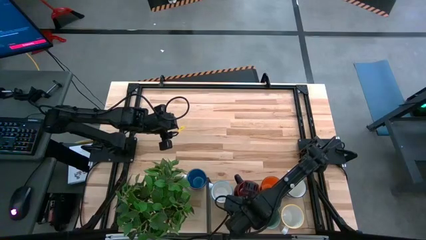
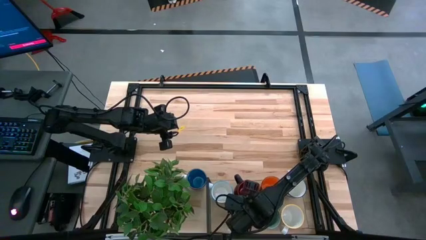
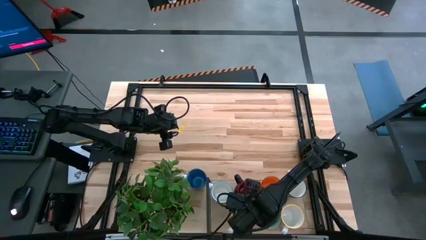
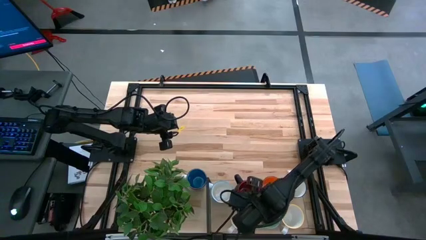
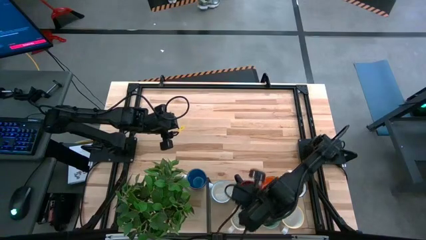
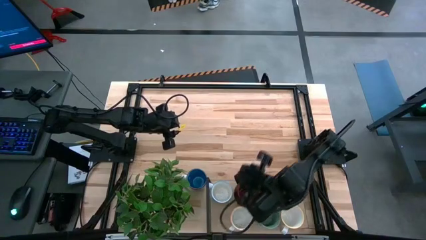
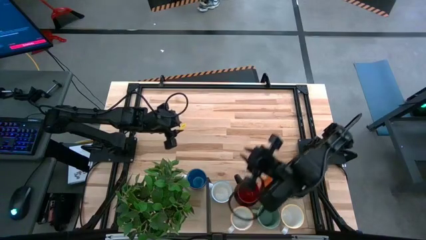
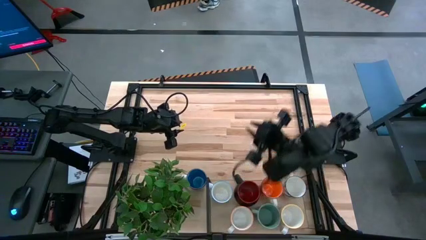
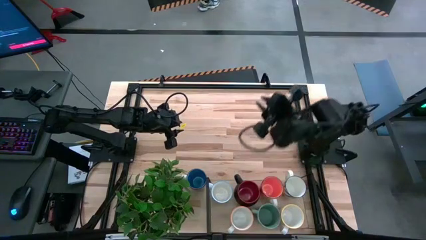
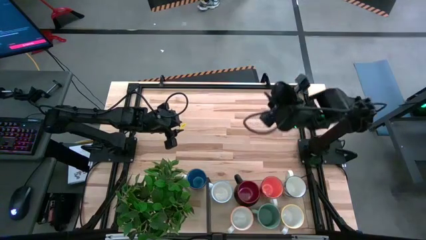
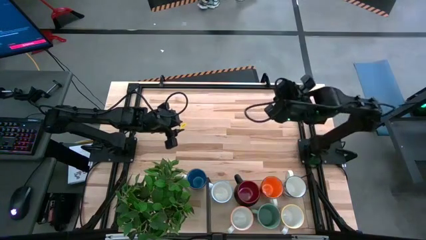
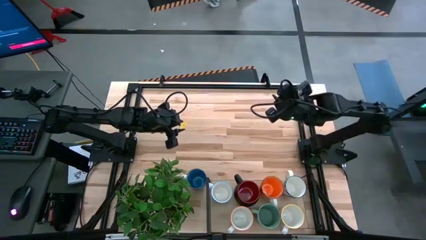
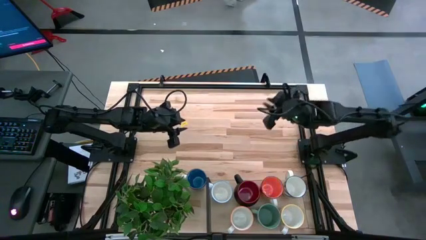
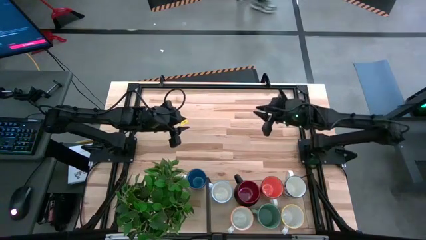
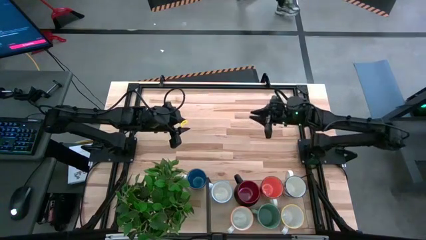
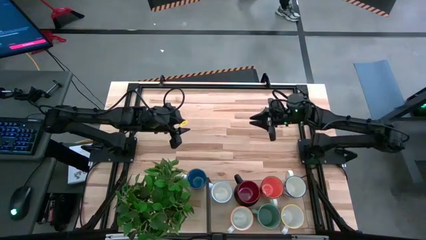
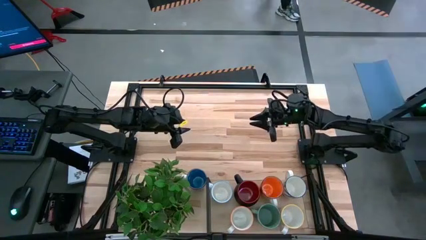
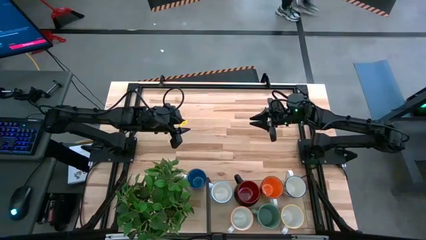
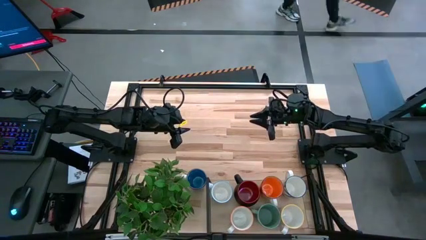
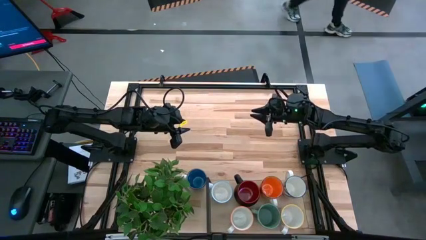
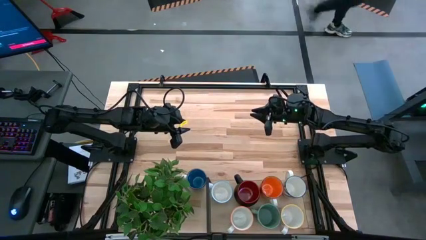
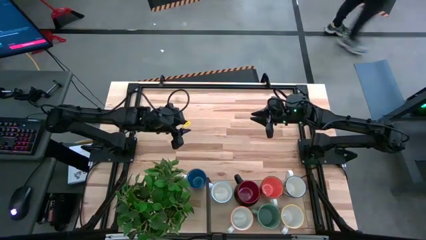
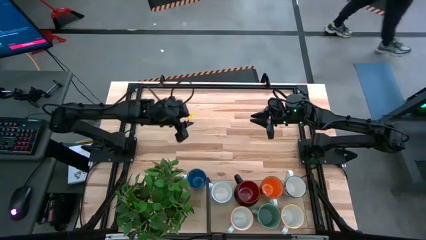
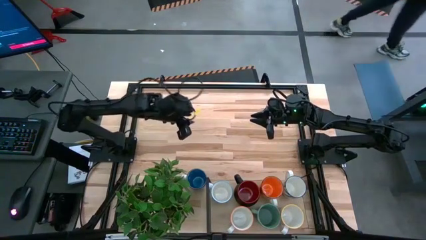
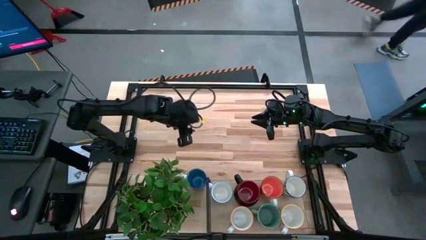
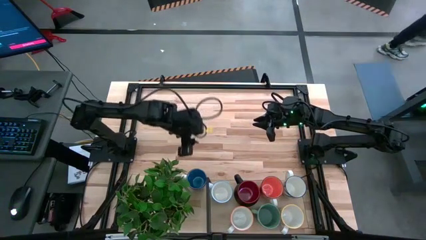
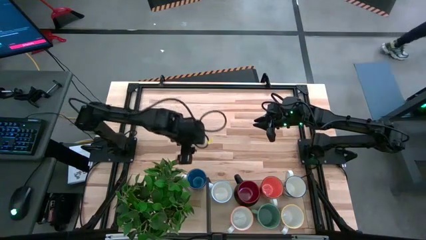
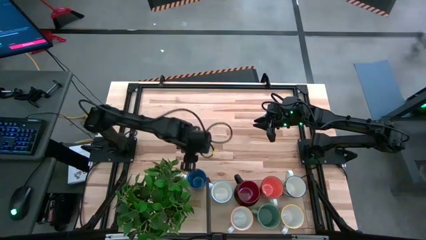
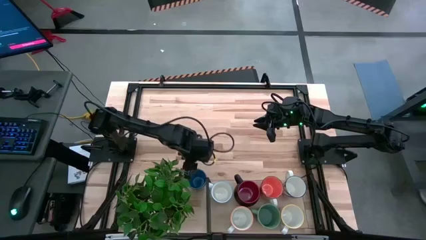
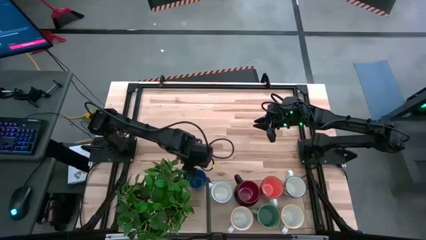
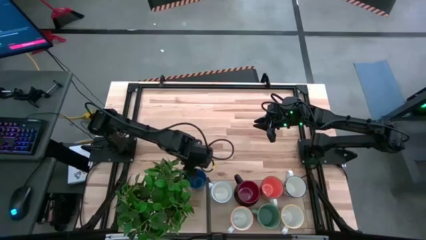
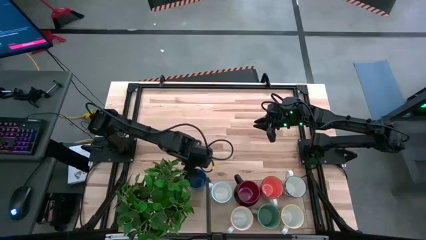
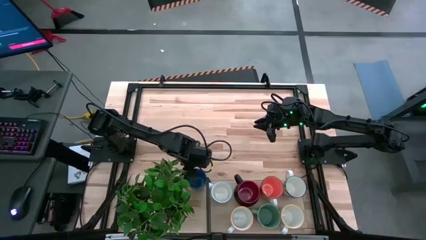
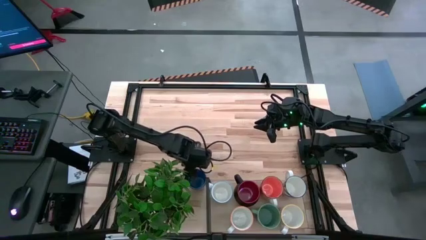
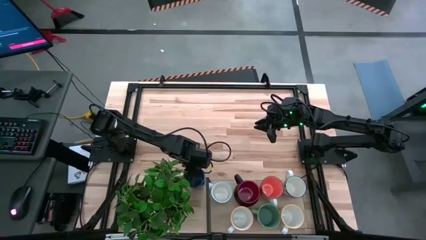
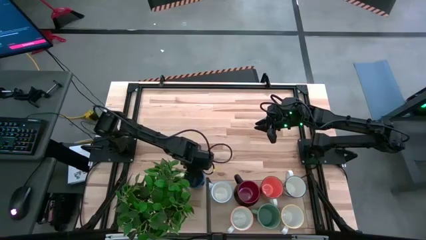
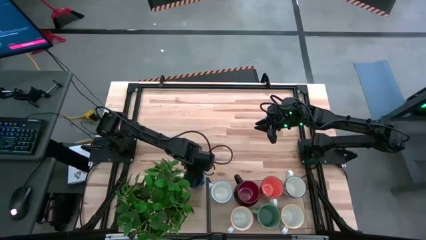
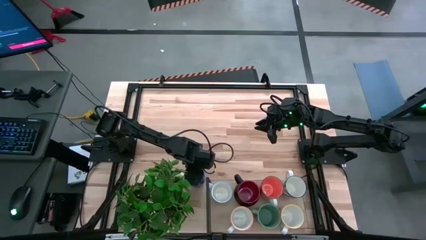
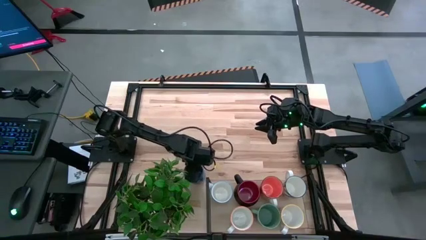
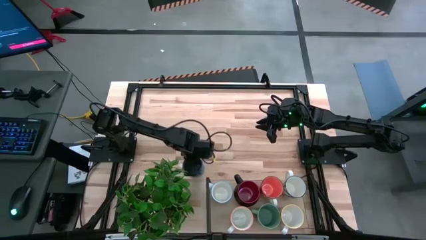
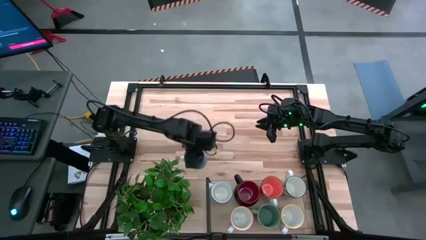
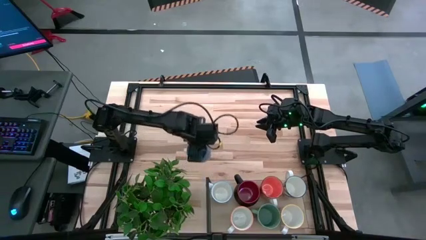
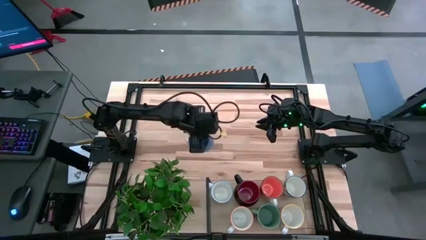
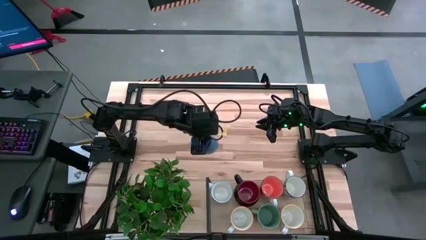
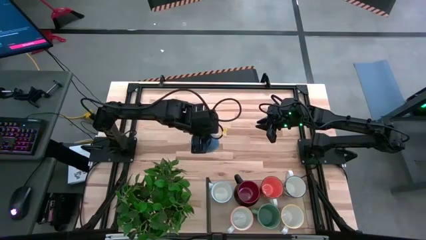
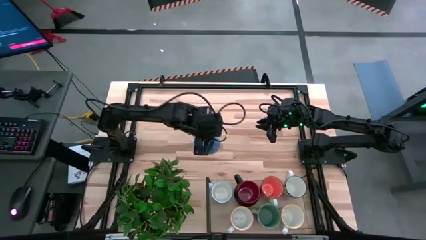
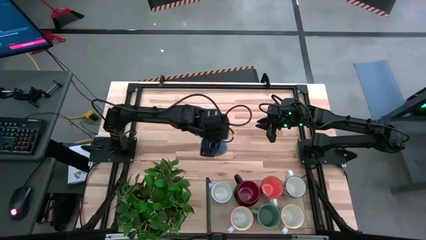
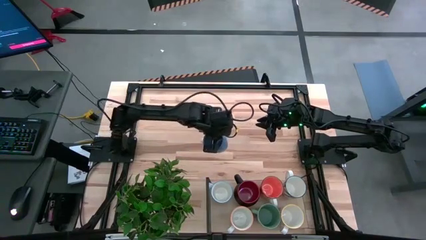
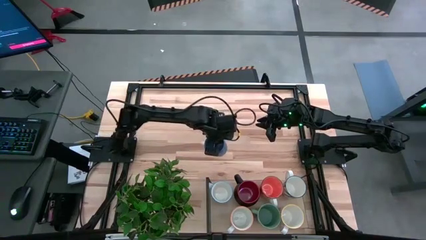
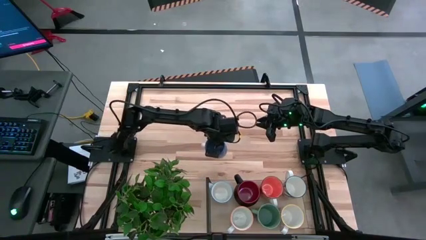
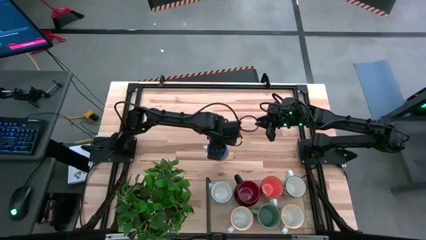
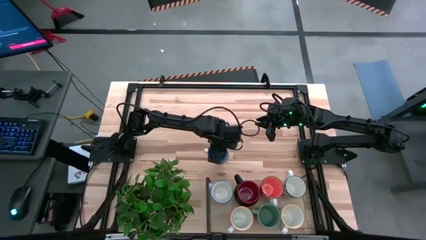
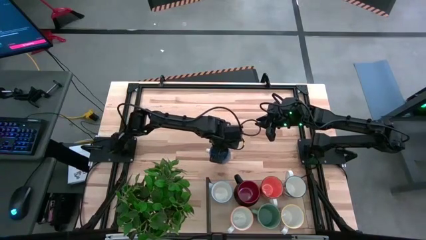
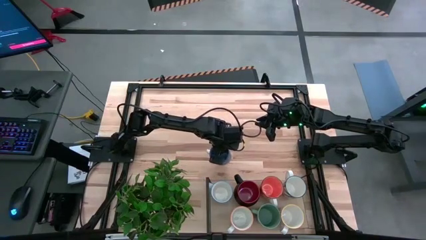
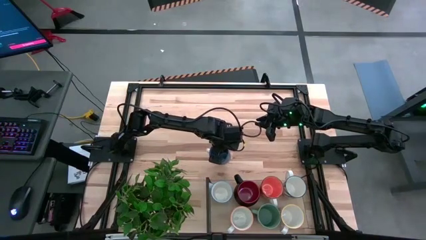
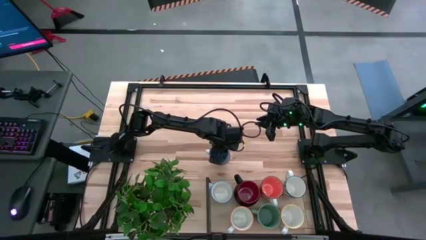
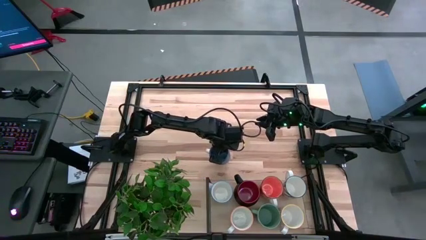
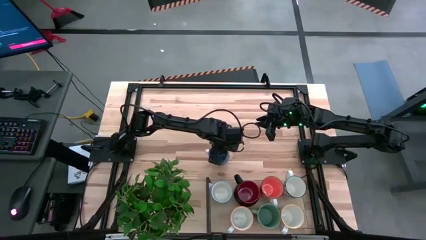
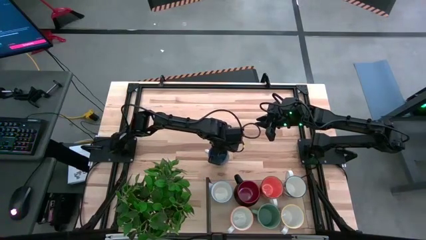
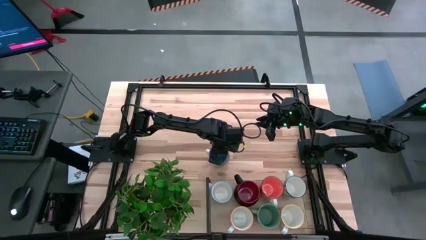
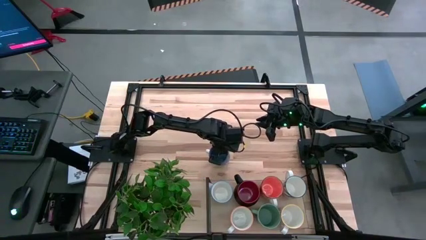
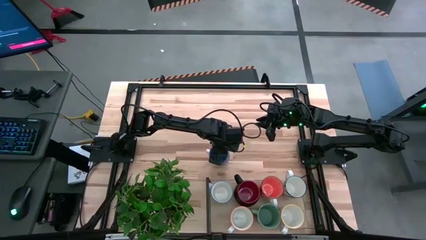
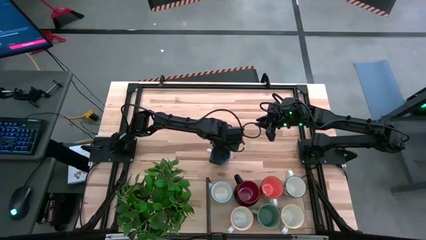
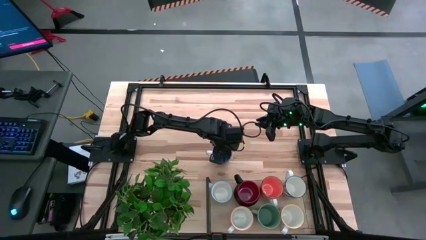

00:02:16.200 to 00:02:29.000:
Task: Place coffee mugs
Move the blue mug to the center of the table

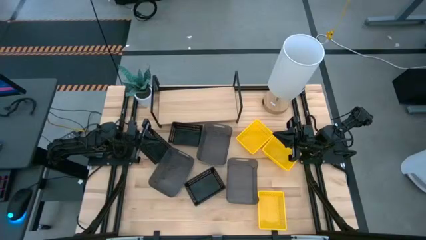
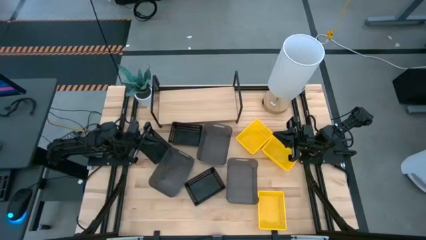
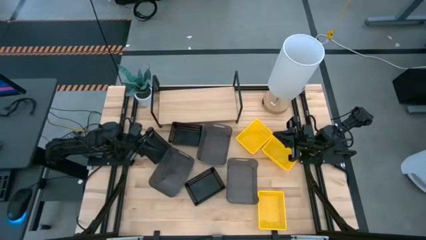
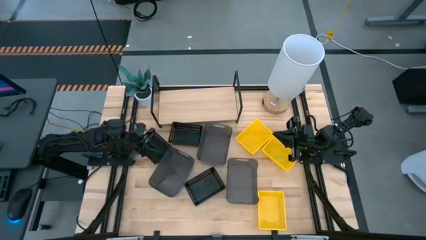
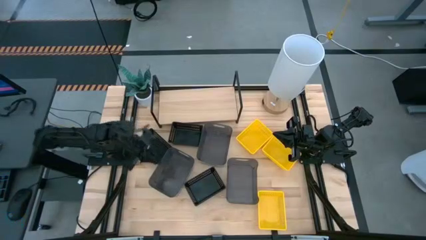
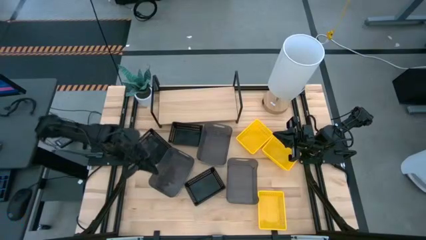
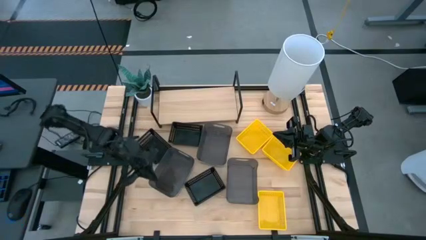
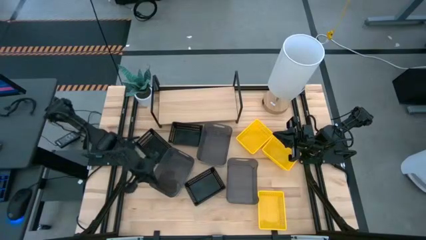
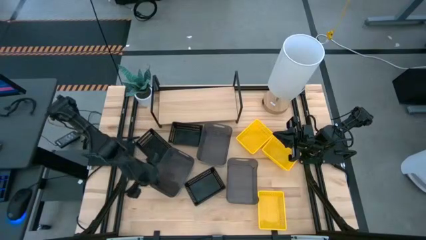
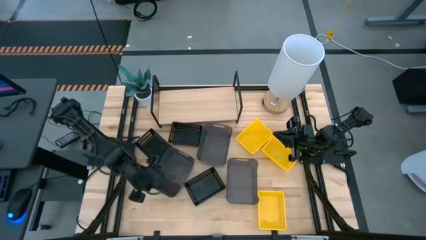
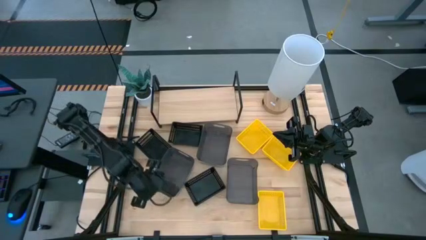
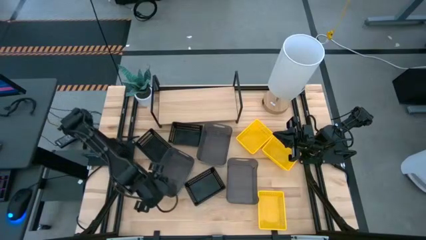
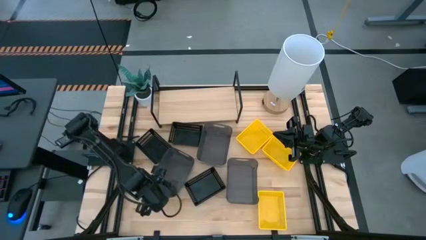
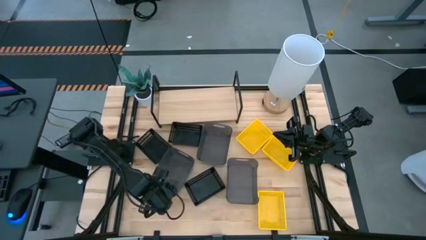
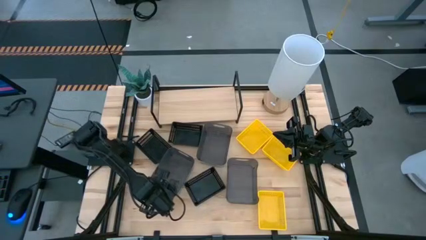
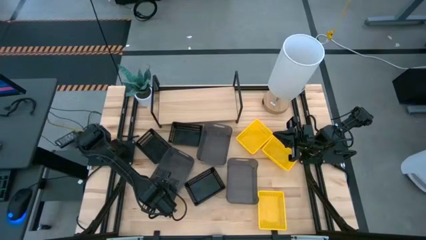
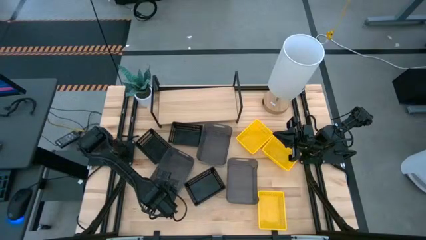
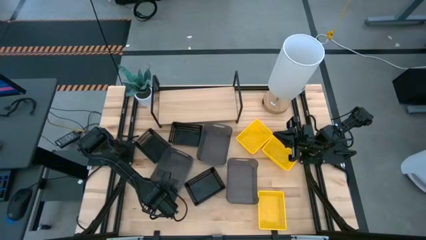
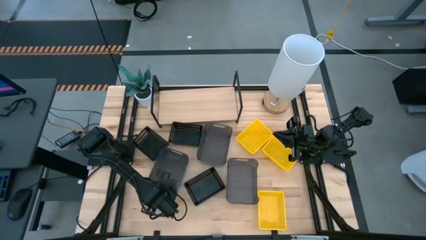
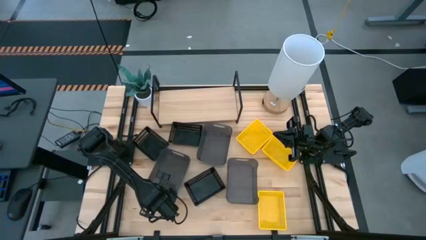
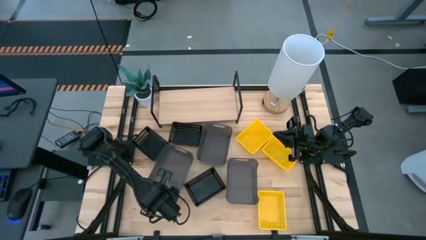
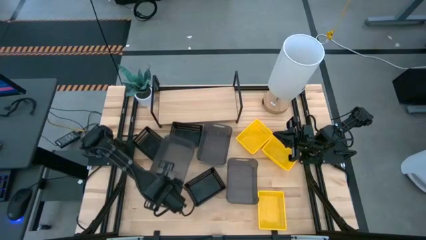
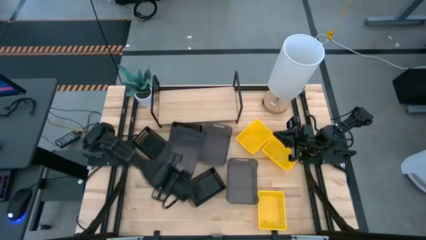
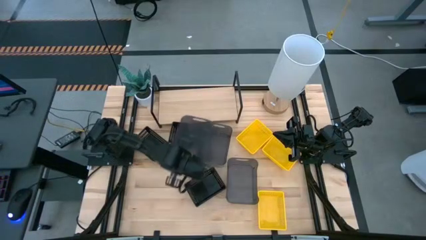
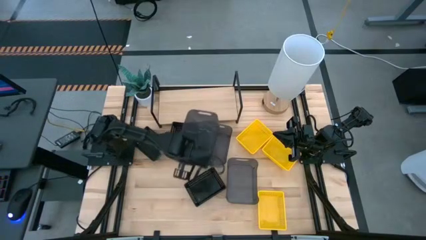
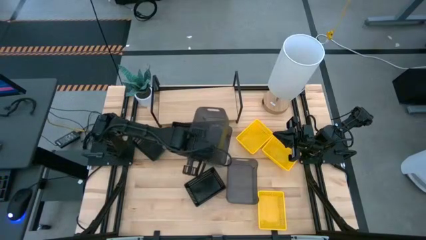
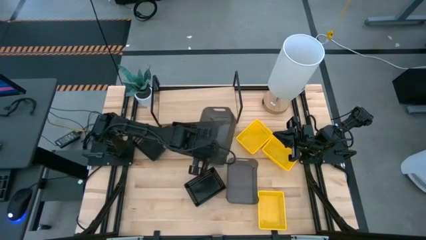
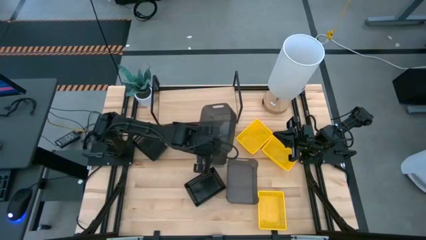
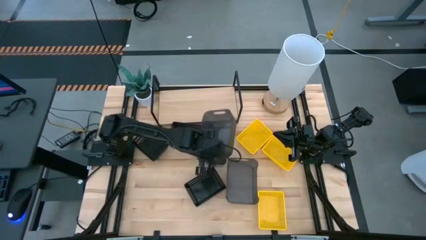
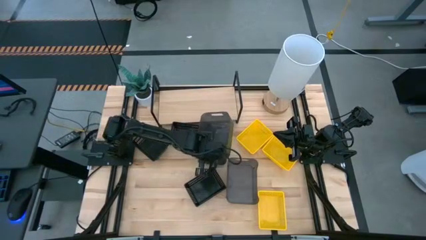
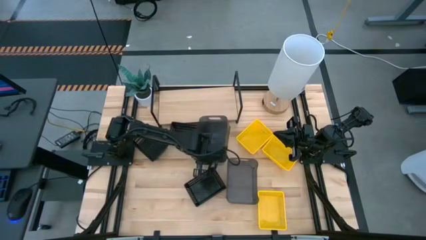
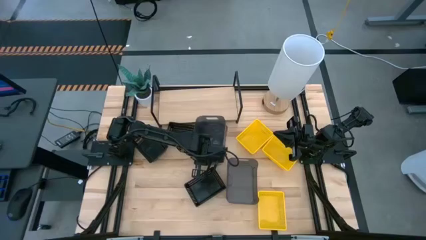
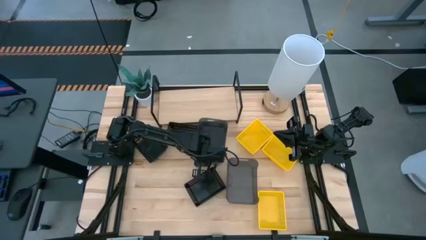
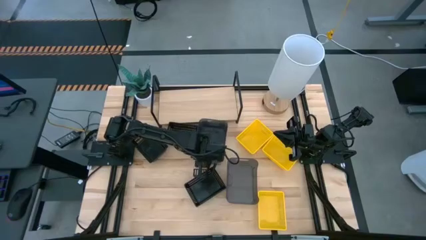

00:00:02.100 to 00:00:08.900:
Task: Stack baskets on shelf by color
Stack the bottom left black bin on top of the top black bin
